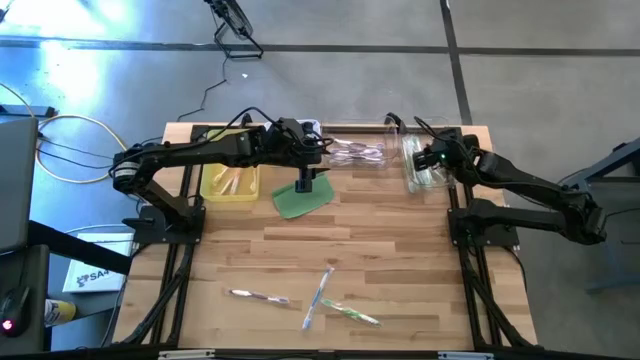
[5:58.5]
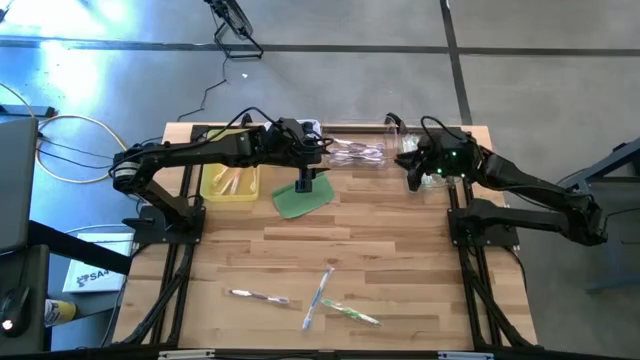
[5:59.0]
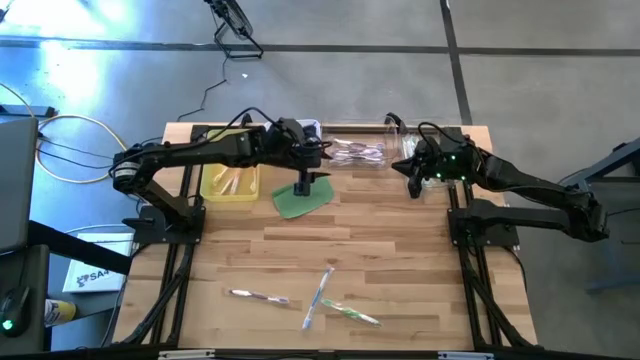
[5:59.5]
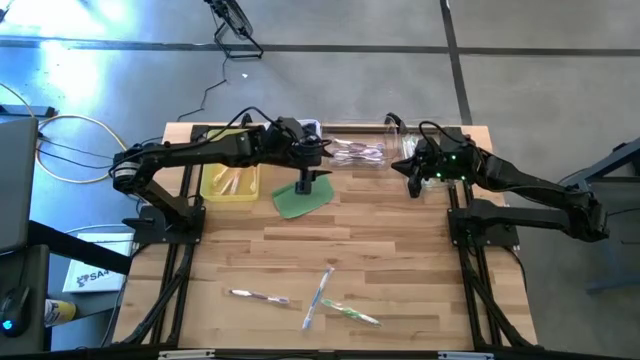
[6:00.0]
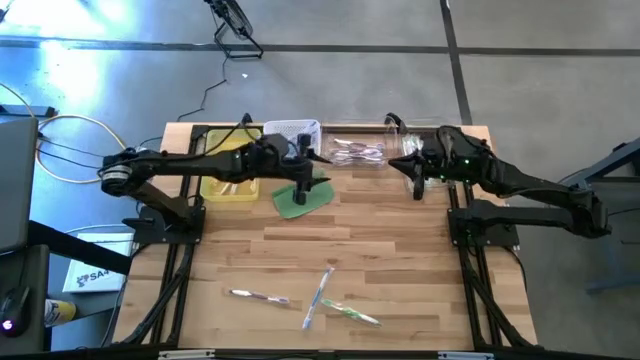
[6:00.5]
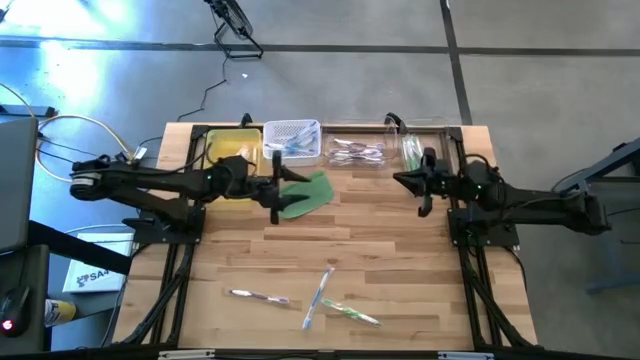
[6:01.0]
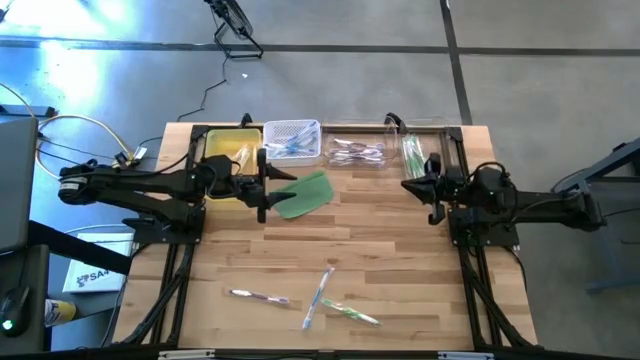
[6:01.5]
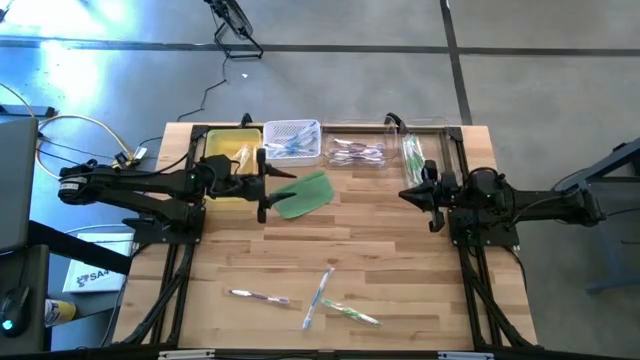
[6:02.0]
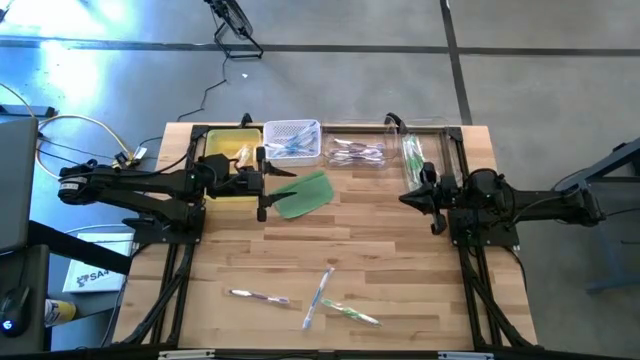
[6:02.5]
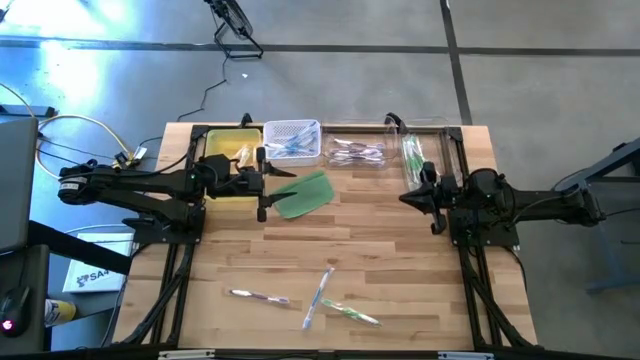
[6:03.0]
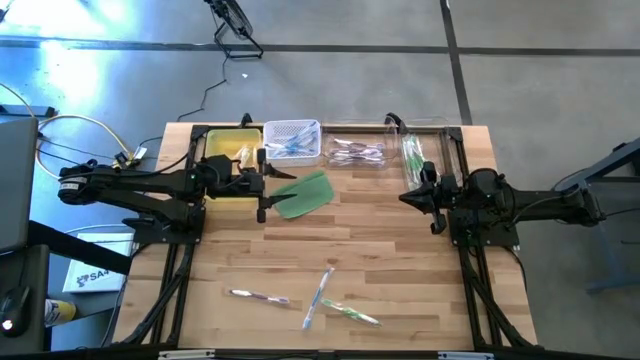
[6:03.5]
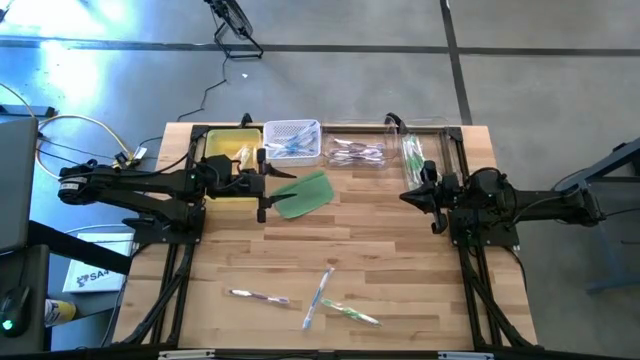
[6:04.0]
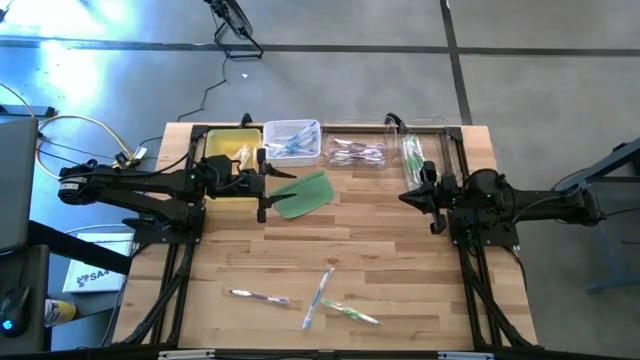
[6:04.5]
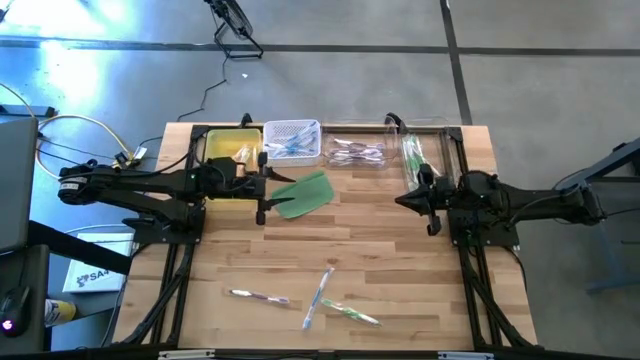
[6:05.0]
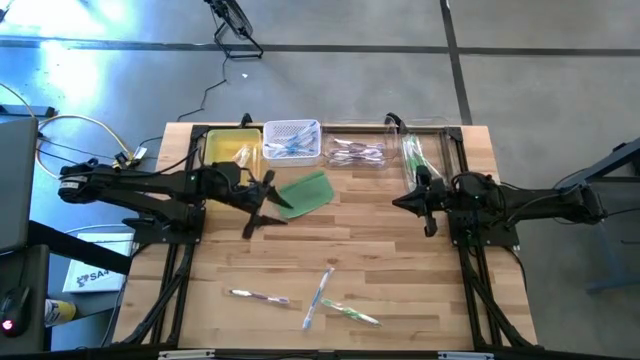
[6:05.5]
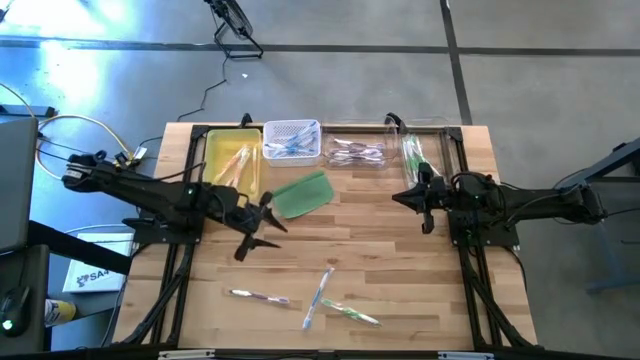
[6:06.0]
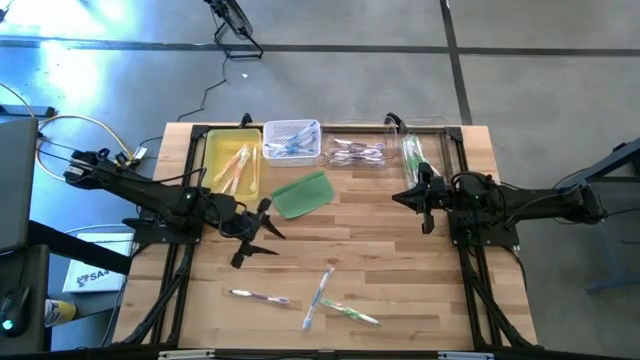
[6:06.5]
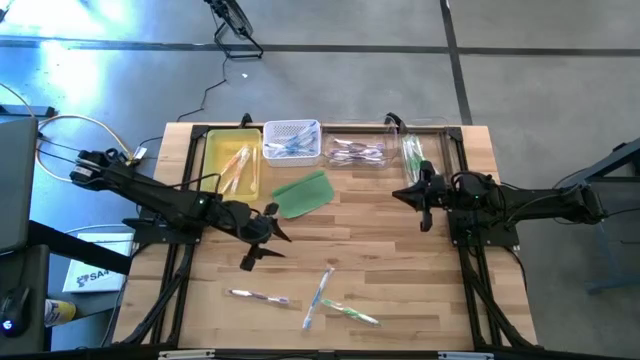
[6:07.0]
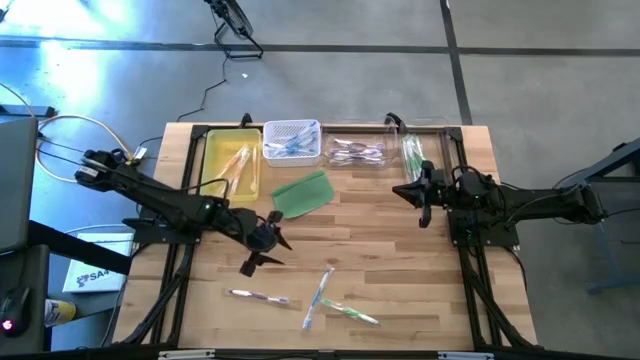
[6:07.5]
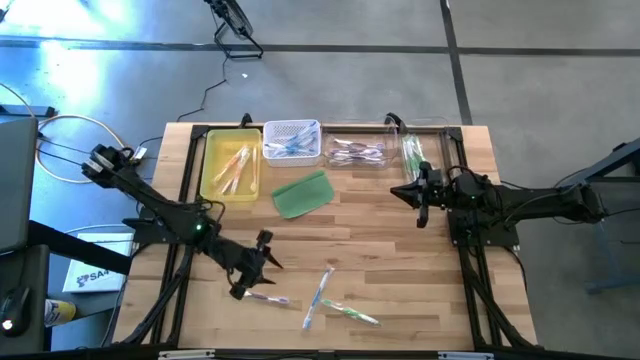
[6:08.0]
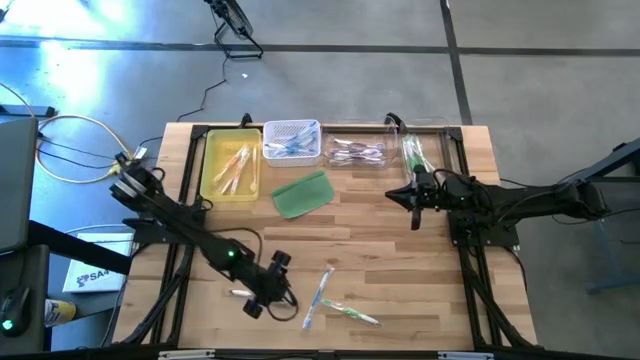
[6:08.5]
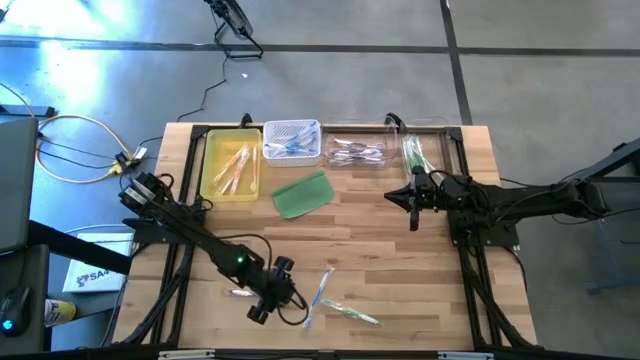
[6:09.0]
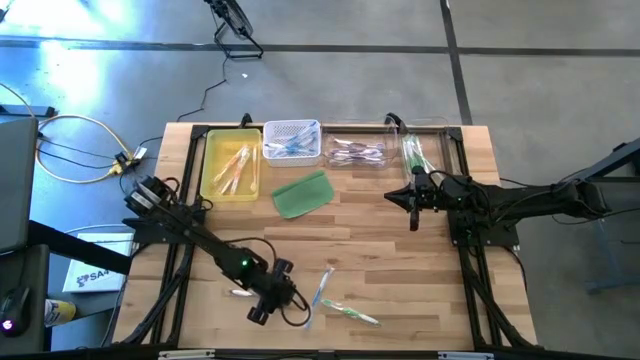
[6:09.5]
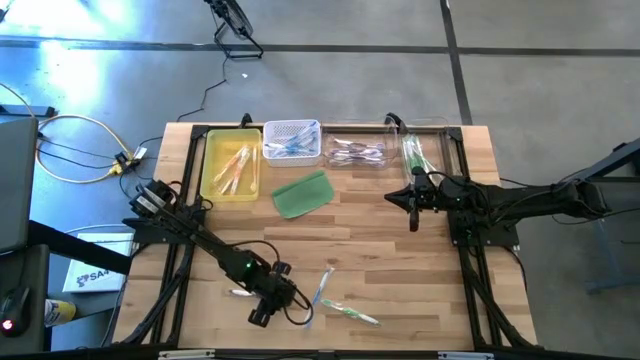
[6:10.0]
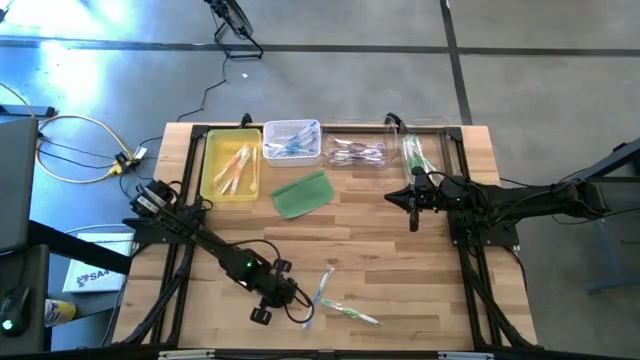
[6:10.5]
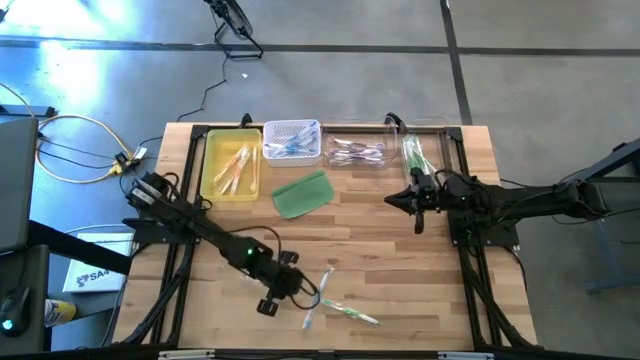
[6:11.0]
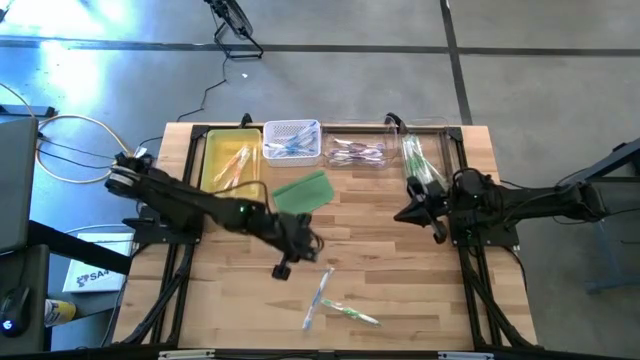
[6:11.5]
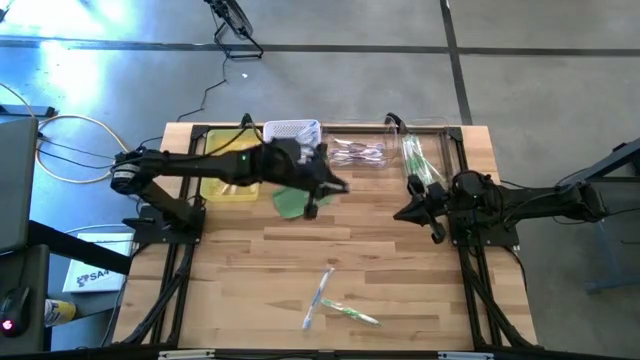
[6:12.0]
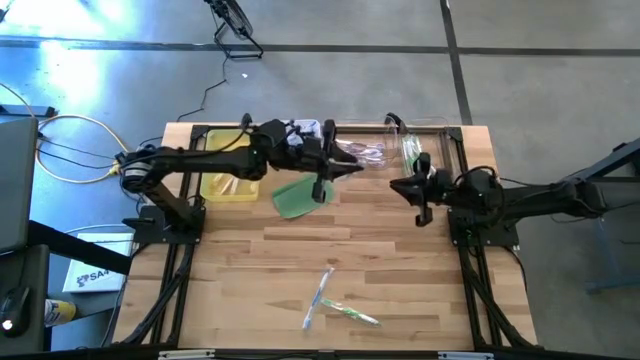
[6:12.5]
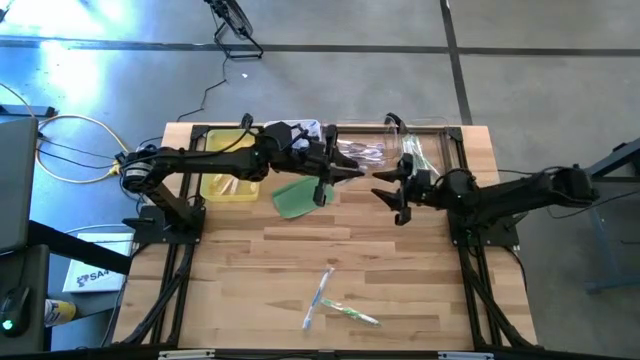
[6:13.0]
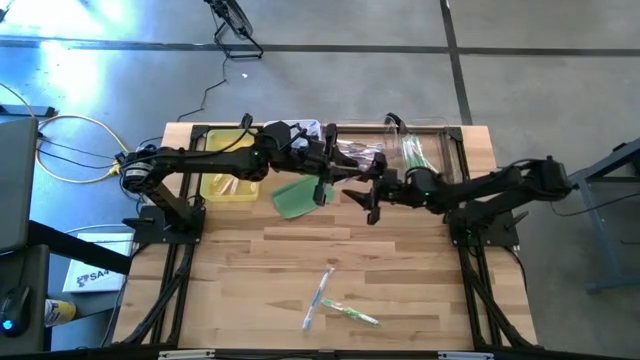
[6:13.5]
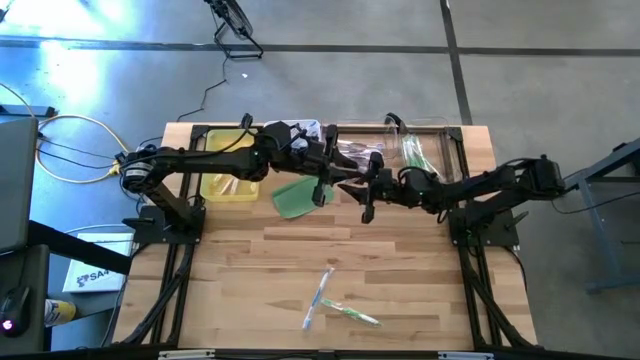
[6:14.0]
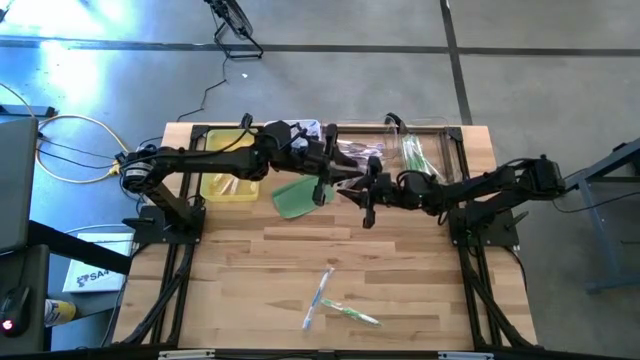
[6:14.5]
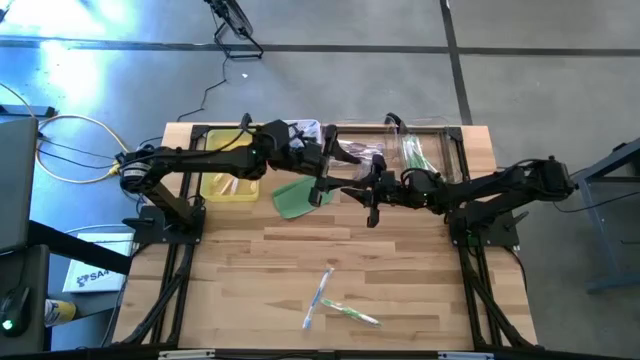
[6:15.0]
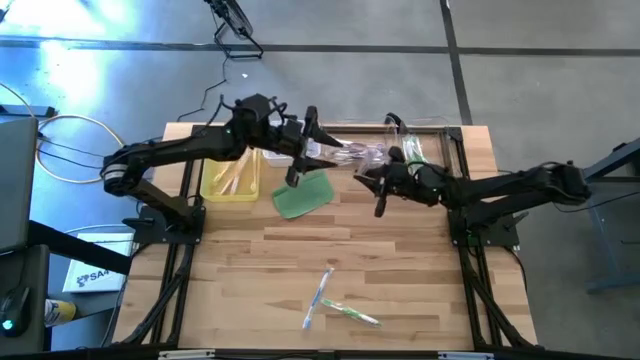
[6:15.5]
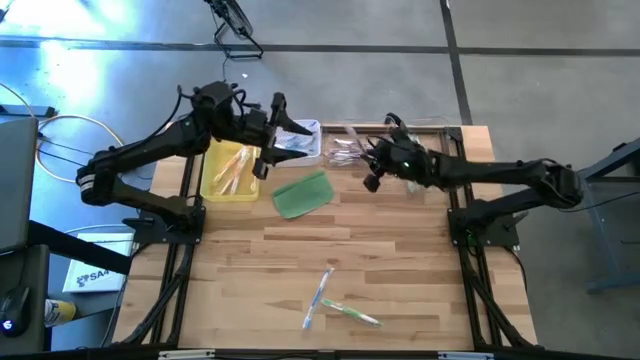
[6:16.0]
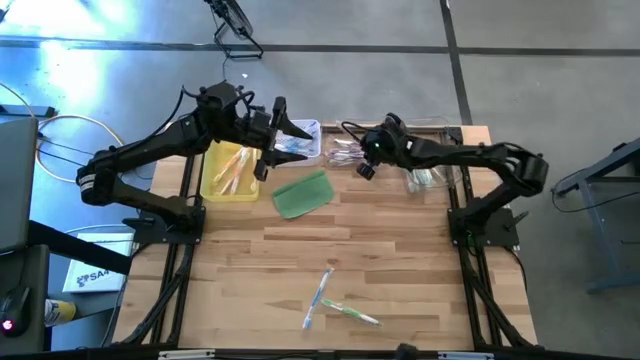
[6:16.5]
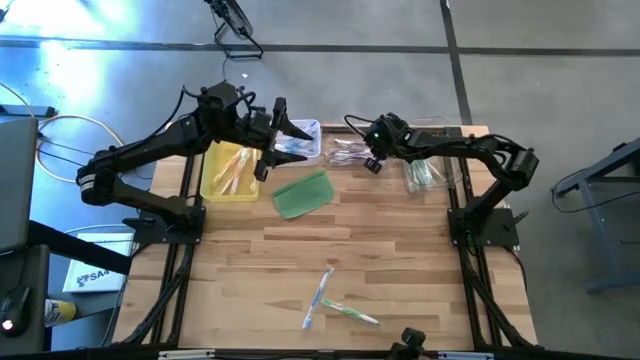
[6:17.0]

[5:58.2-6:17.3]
Task: Pick & Place Toothbrushes
Put the violet toothbrush into the left transparent bin

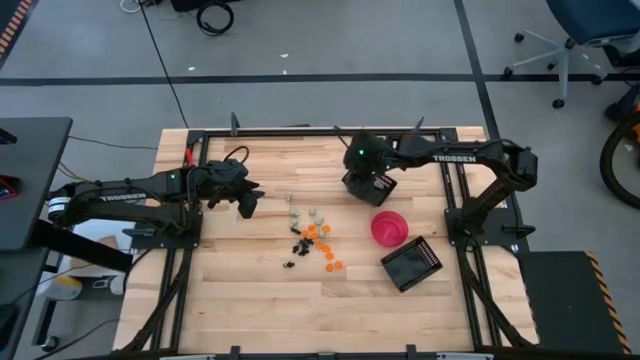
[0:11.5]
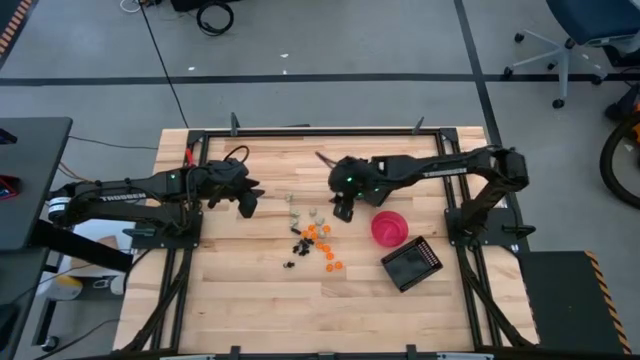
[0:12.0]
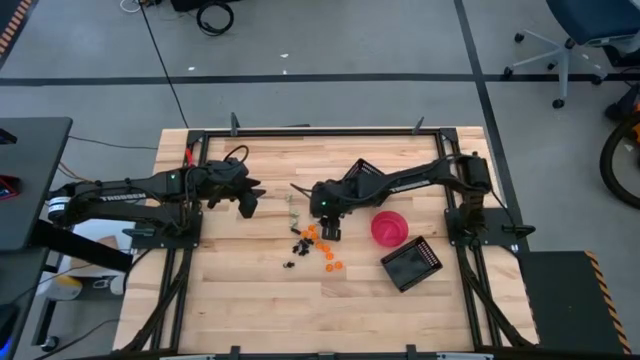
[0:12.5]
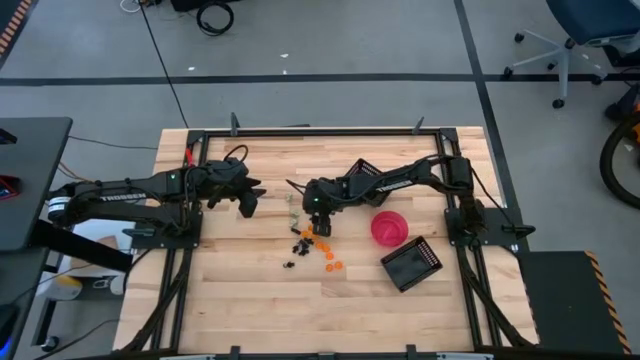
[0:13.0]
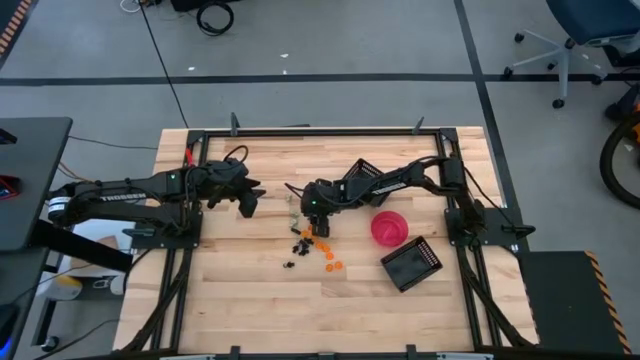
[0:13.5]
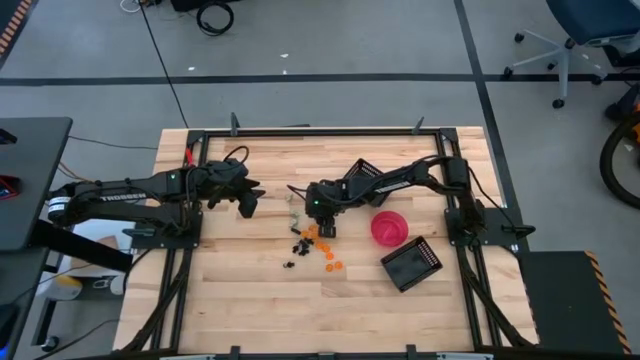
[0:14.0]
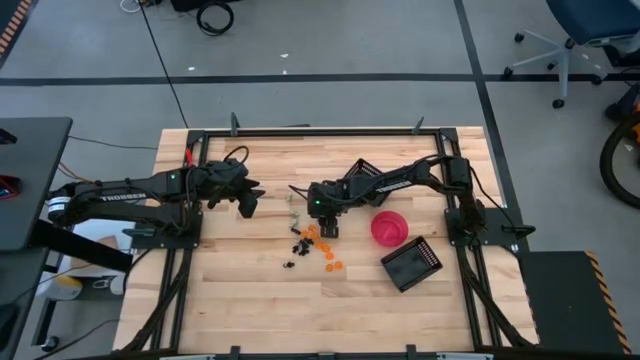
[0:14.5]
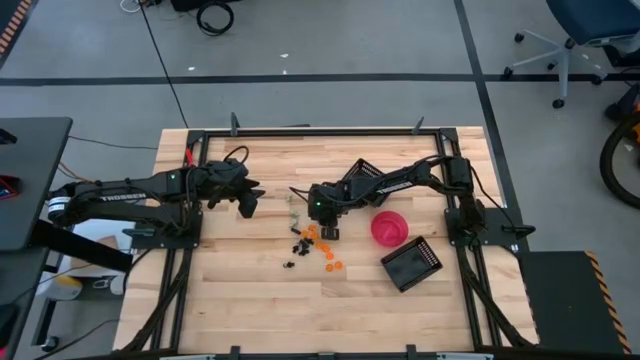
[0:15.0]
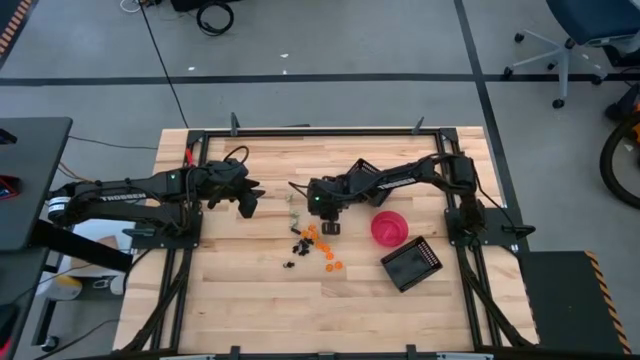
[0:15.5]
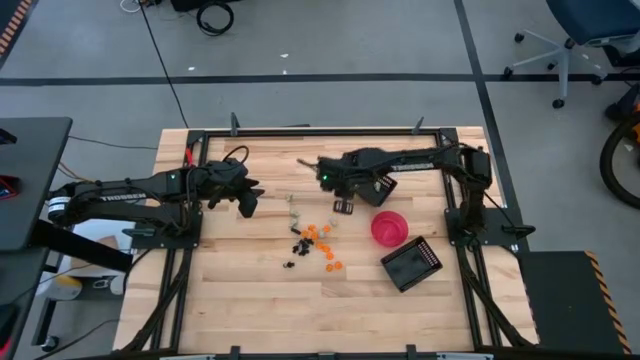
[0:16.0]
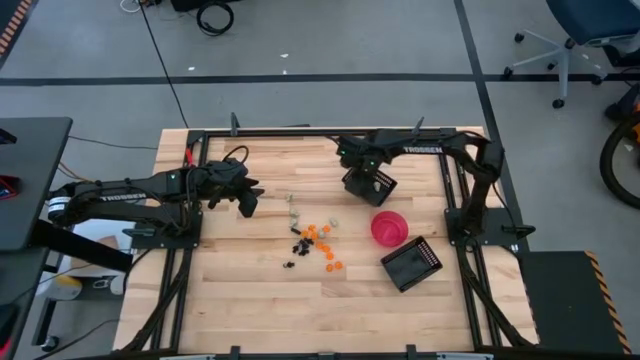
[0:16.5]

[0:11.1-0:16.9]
Task: Sort Halloween decoration
Put the white skull toy into the top black basket
